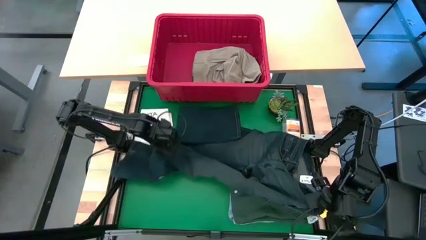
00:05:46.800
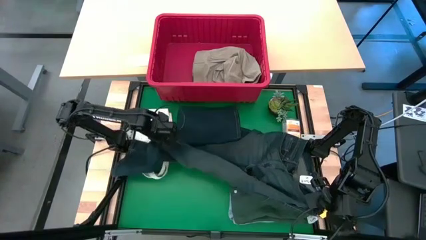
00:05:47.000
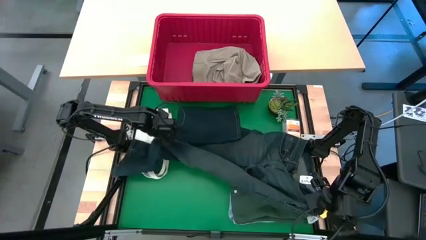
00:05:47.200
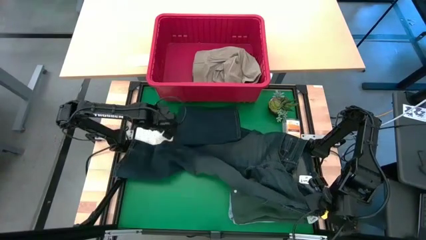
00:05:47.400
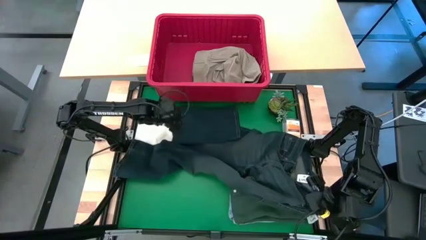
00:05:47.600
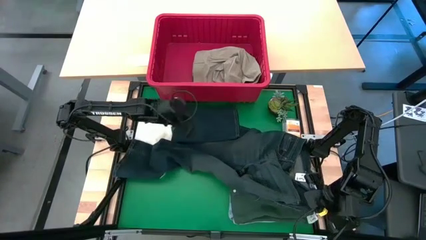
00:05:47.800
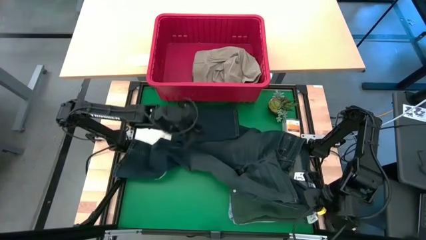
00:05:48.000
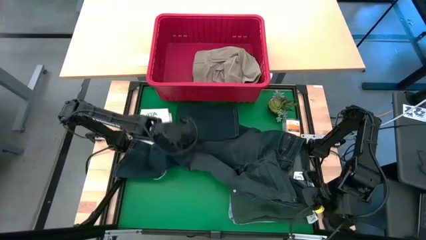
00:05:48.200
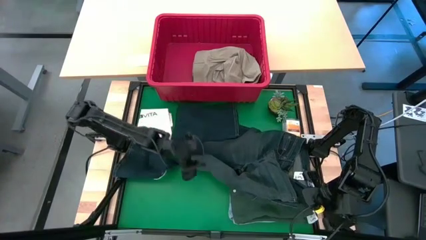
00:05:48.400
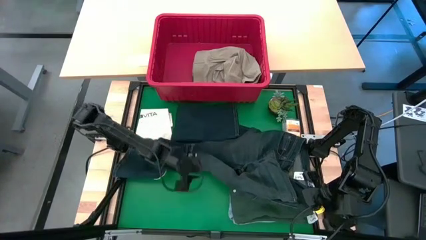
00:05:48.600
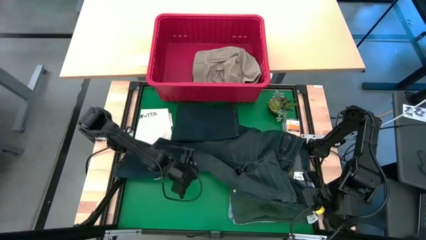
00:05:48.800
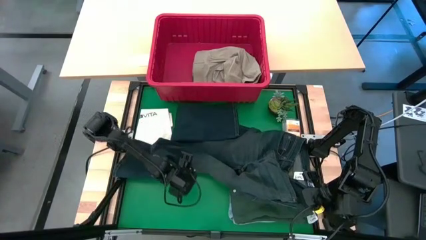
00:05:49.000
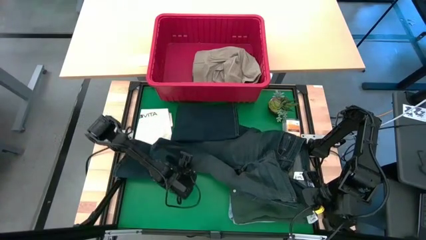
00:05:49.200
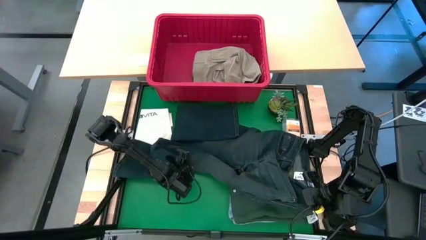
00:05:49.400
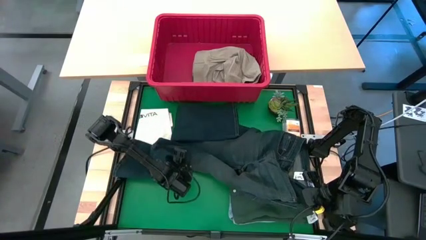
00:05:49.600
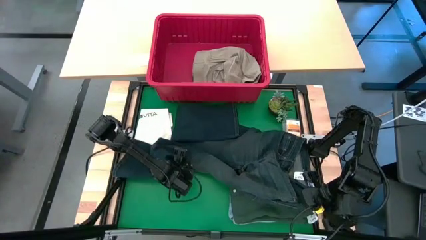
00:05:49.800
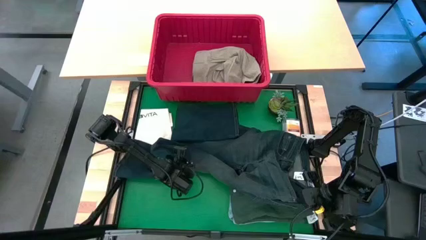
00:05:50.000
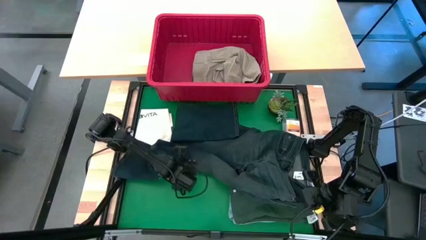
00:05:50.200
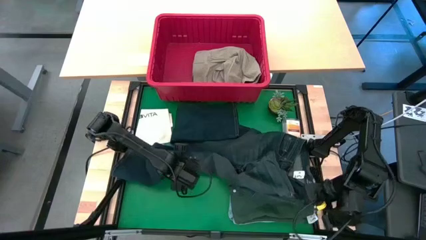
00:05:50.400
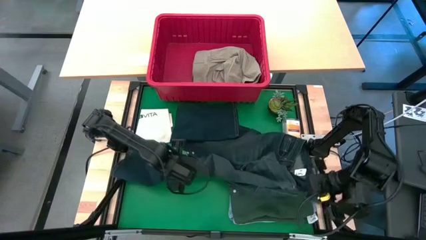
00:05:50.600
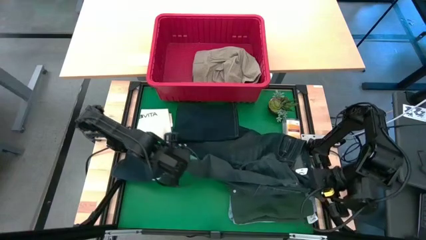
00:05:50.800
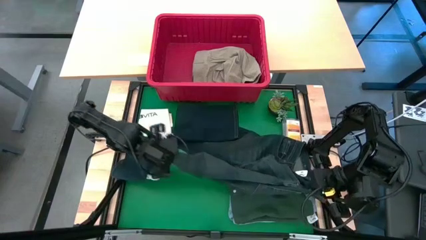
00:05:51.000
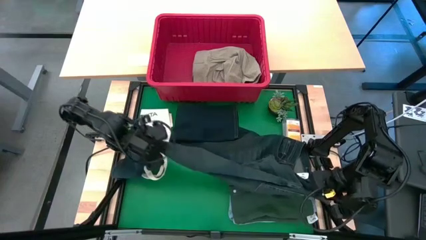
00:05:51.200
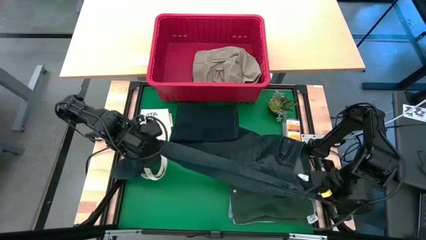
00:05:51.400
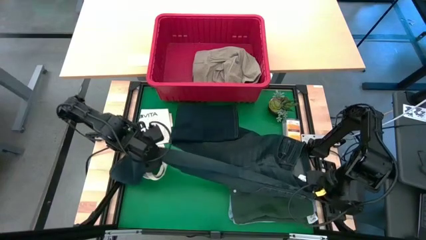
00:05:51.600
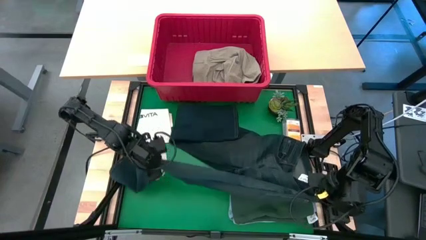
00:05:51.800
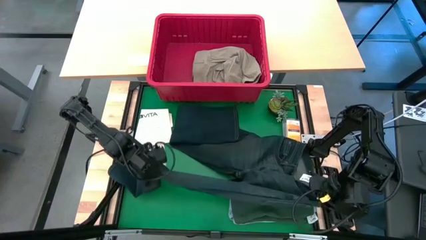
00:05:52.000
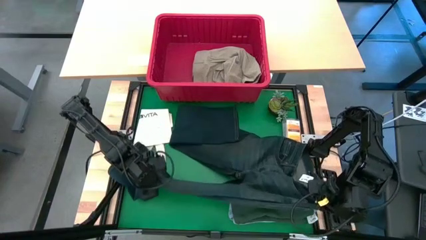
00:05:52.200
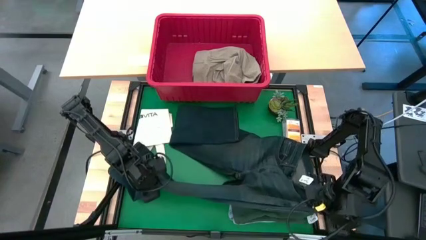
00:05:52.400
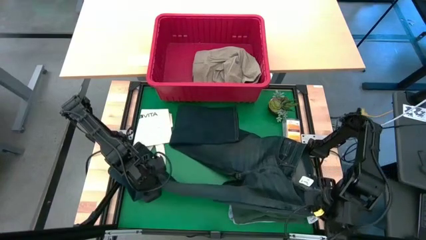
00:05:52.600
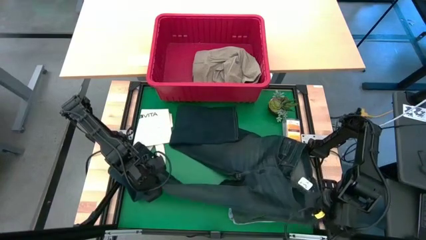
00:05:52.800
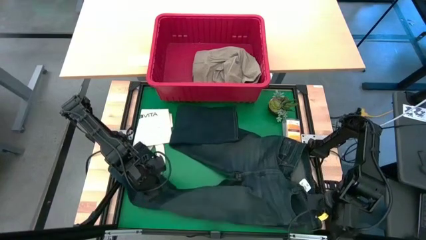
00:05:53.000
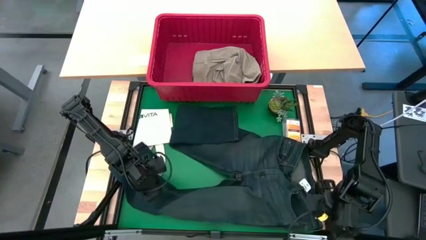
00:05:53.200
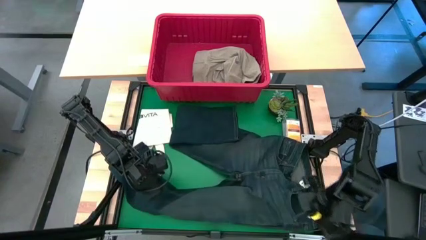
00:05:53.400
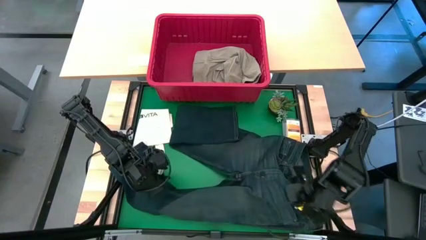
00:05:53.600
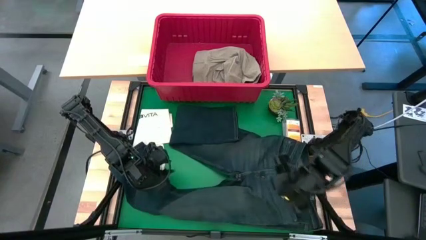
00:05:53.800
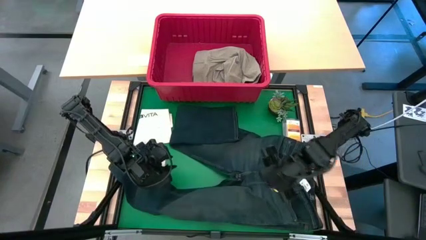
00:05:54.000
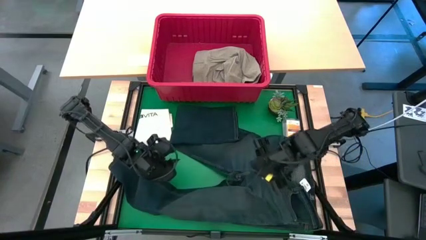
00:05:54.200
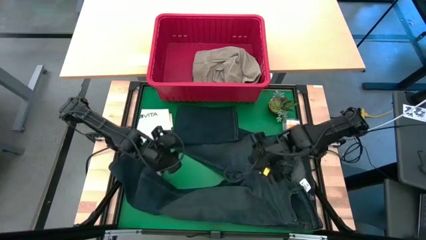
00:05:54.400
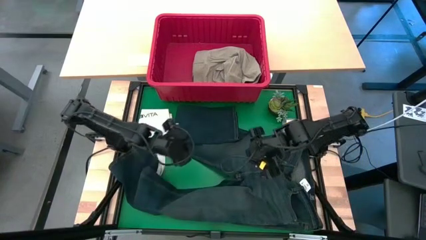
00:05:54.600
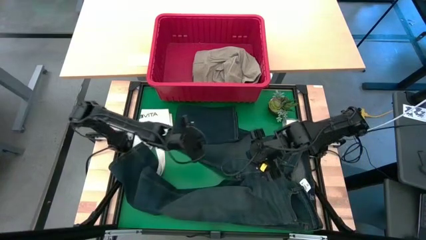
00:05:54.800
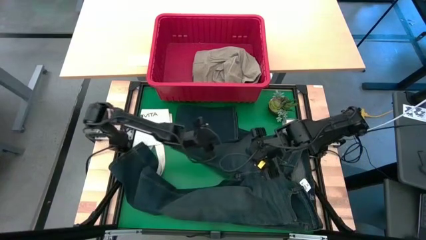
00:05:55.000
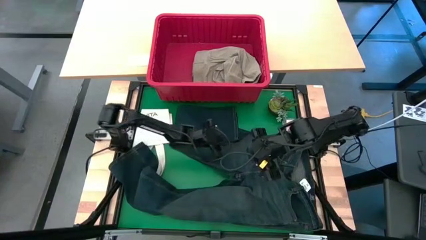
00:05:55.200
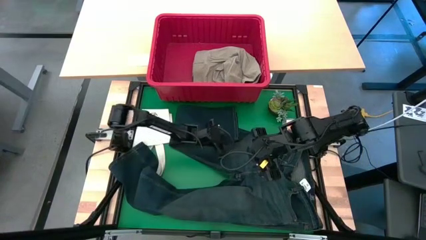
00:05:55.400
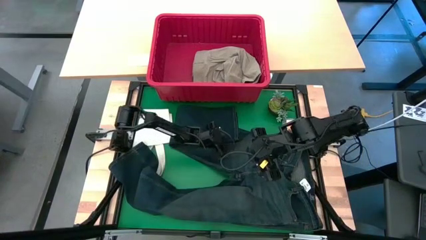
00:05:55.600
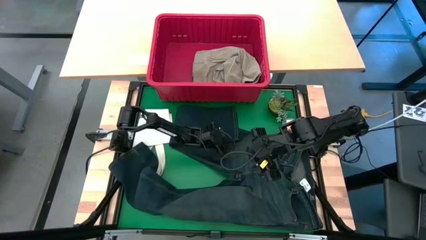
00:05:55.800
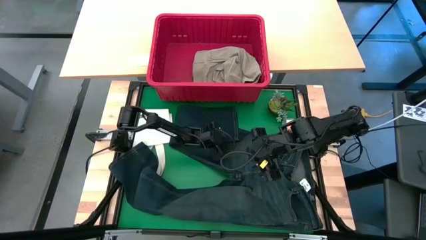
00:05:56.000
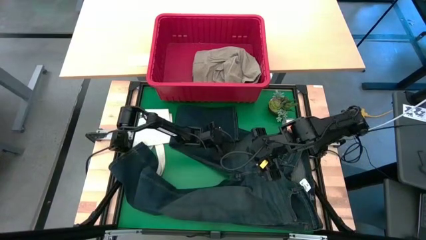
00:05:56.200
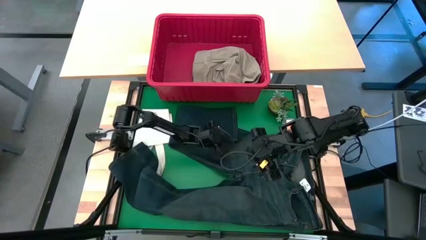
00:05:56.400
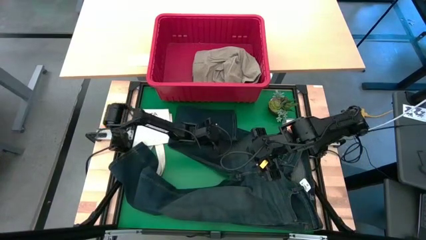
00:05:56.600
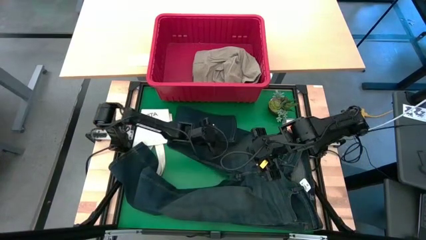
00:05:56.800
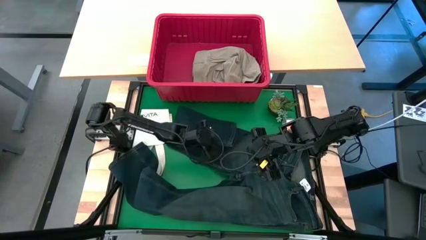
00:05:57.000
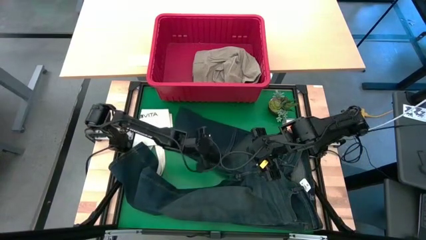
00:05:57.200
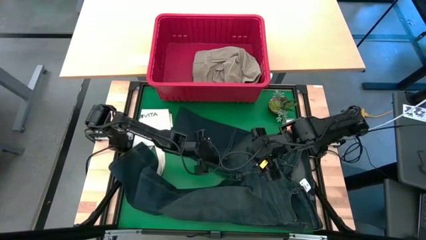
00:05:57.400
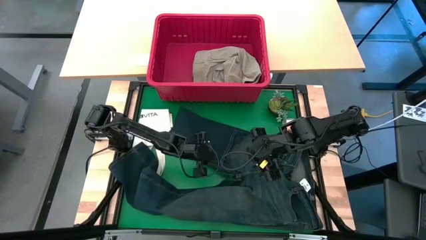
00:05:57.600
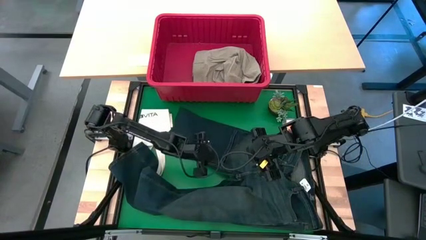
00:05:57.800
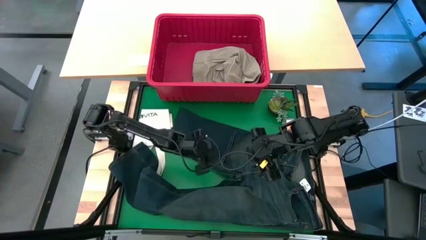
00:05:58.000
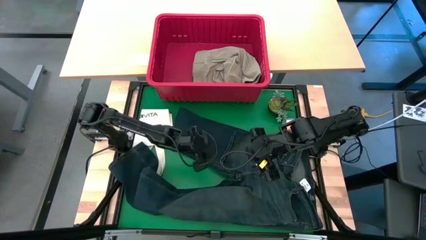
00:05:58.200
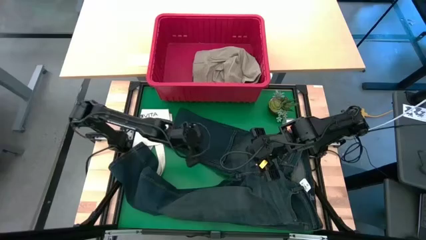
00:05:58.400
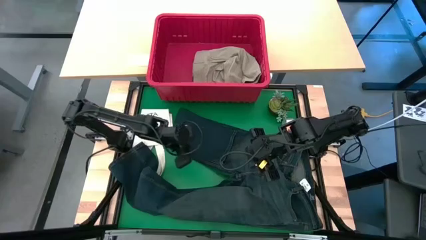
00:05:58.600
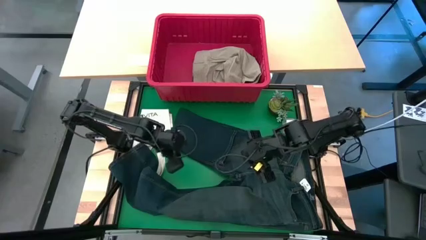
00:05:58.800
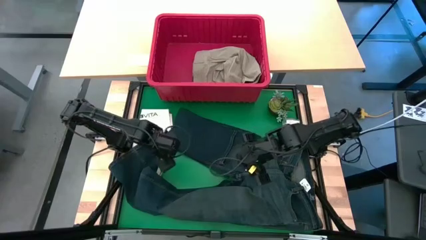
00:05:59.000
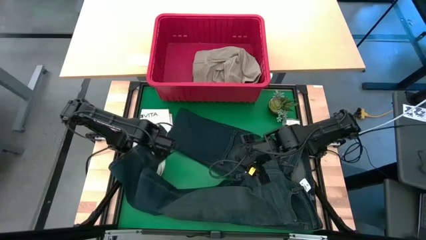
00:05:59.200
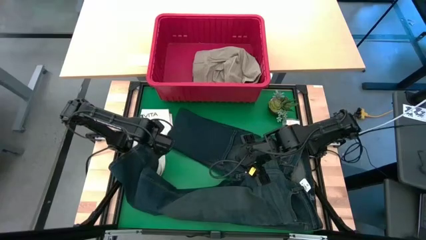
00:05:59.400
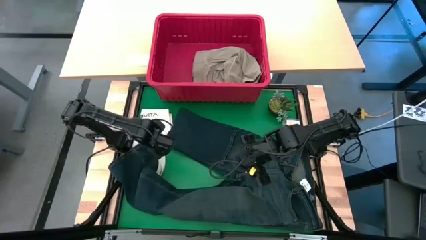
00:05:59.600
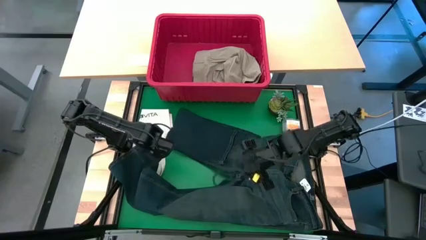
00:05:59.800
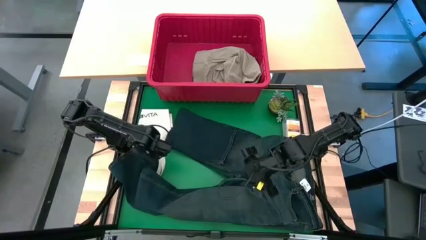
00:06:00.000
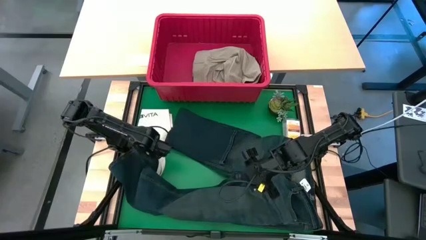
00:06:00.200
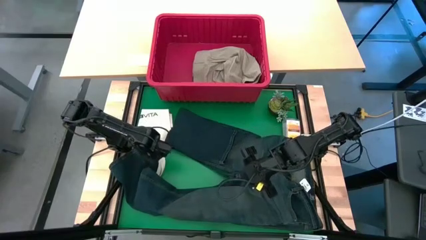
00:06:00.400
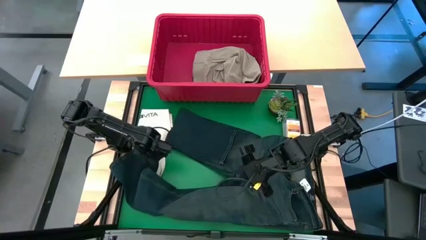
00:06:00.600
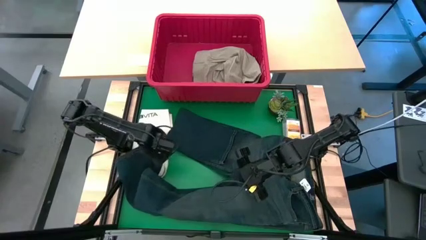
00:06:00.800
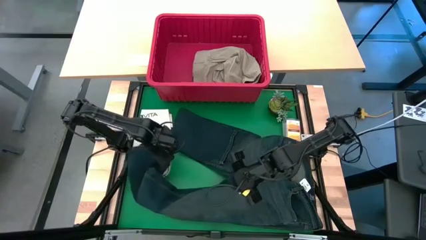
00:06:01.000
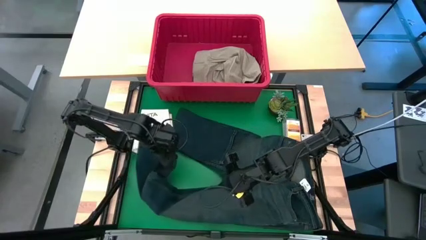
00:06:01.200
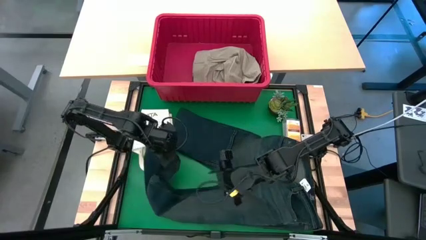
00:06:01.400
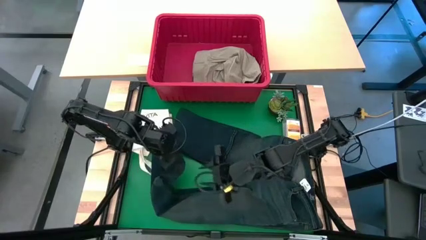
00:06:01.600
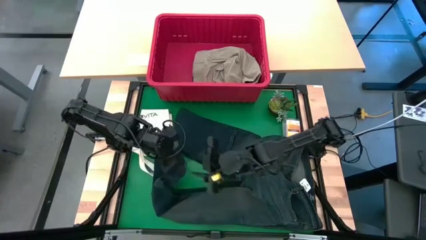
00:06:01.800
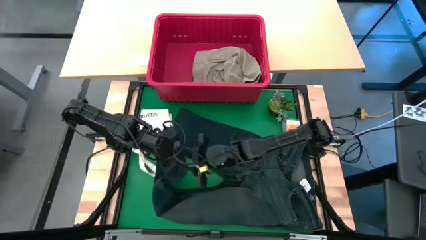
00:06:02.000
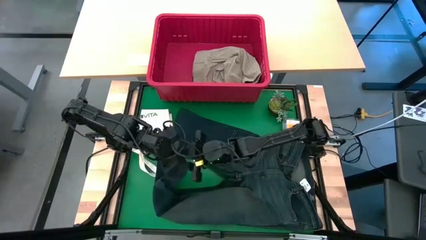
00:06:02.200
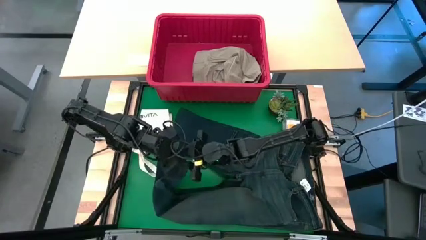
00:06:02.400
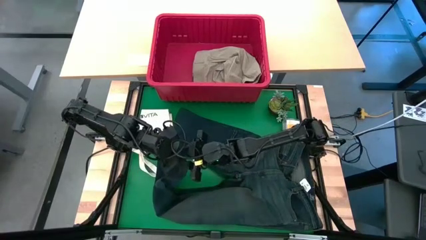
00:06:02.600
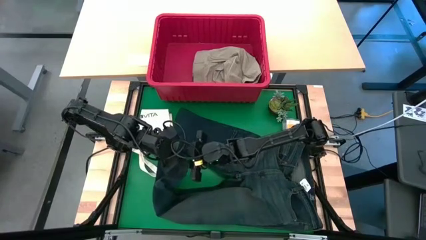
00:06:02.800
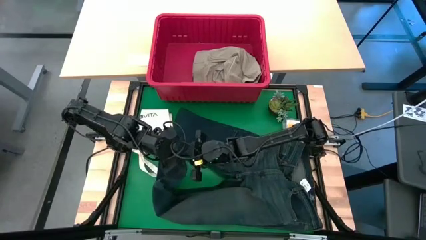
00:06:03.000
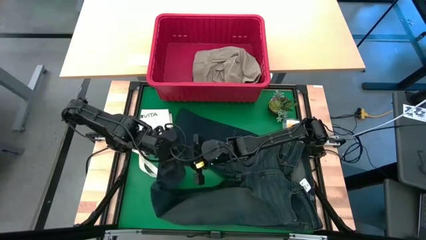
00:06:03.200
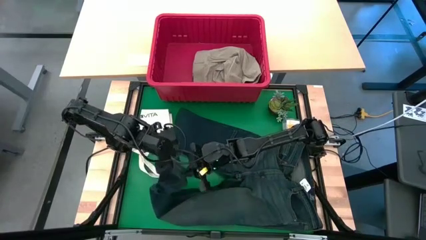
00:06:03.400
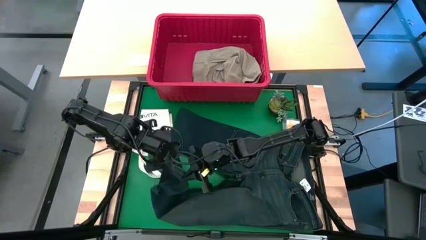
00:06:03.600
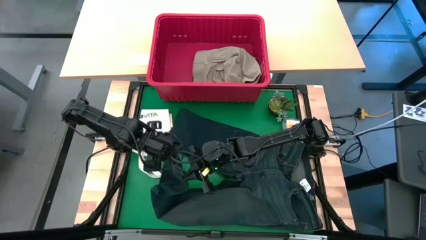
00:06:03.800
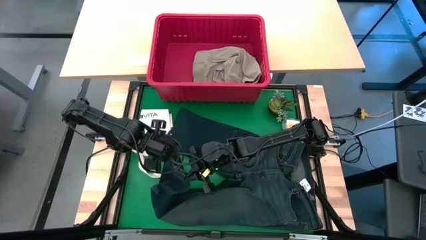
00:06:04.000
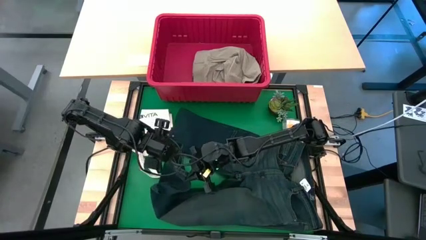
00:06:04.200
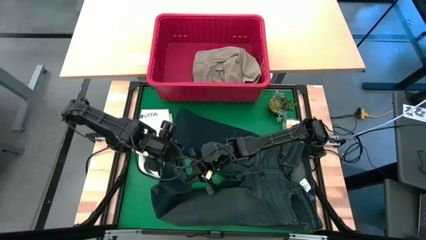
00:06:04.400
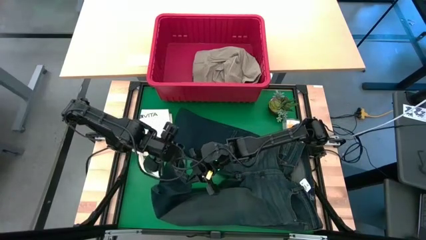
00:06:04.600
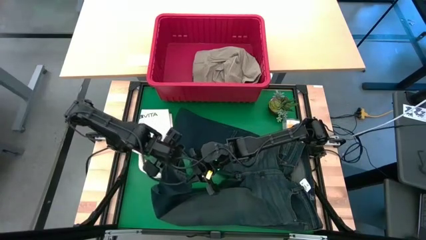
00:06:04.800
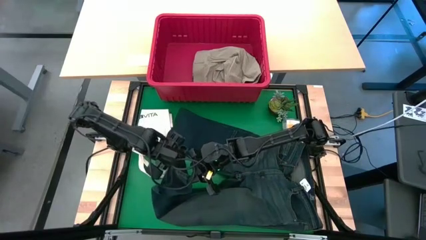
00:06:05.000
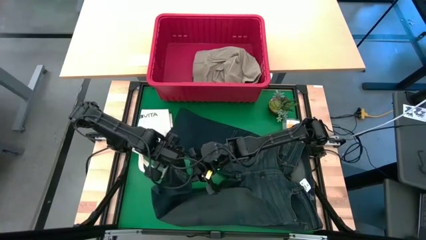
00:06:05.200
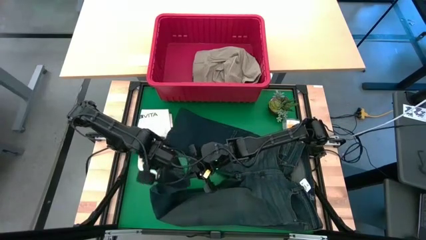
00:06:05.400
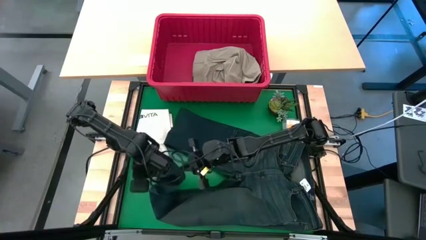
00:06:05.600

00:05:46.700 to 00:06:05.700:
Task: Fold Laundry from Bin
Fold the dark blue jeans
